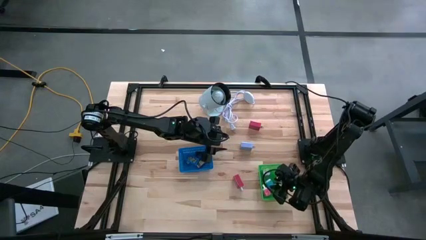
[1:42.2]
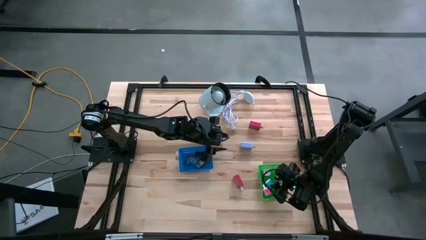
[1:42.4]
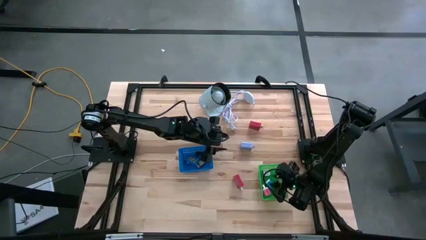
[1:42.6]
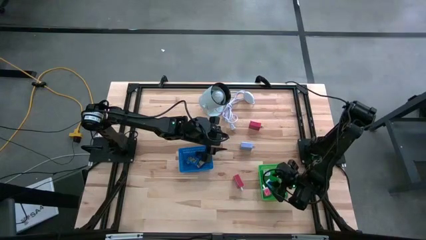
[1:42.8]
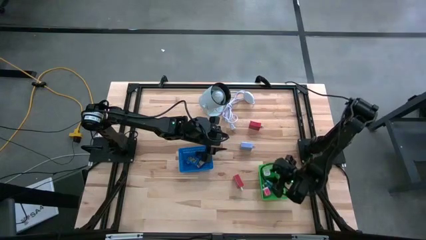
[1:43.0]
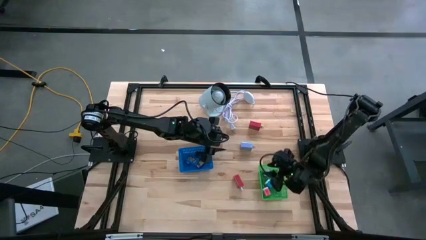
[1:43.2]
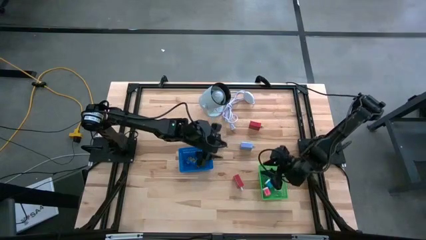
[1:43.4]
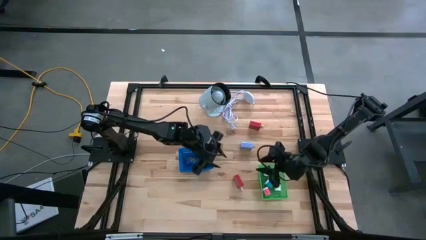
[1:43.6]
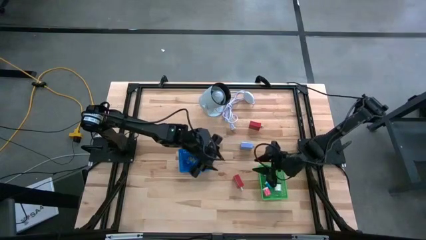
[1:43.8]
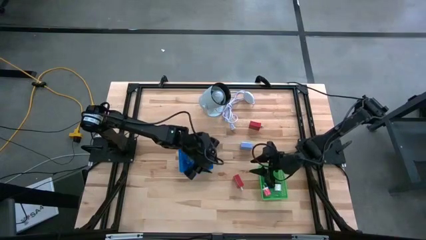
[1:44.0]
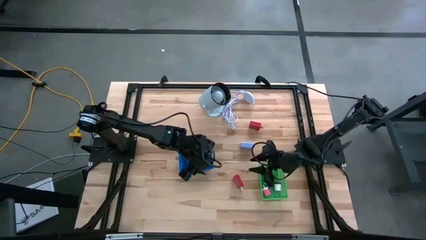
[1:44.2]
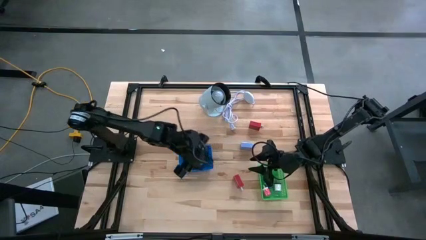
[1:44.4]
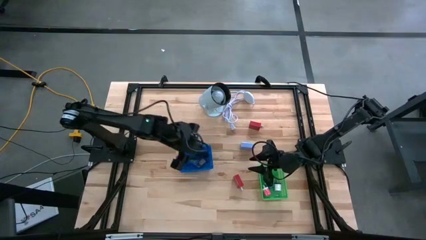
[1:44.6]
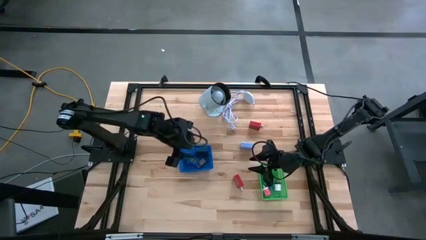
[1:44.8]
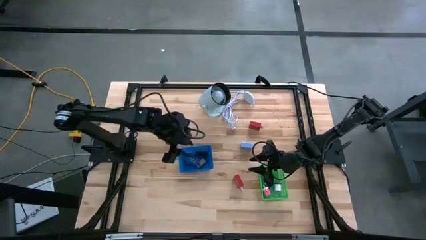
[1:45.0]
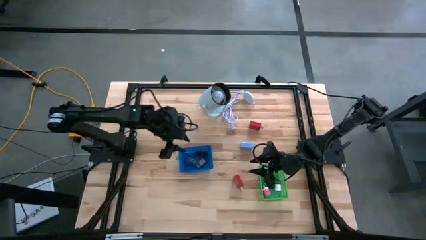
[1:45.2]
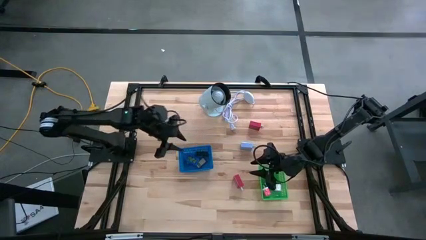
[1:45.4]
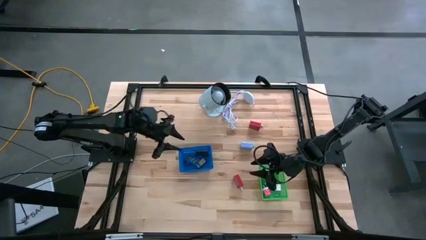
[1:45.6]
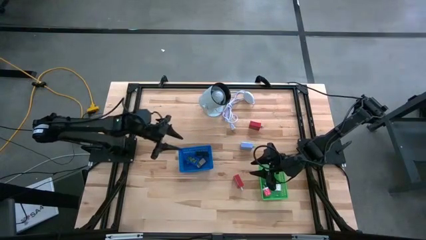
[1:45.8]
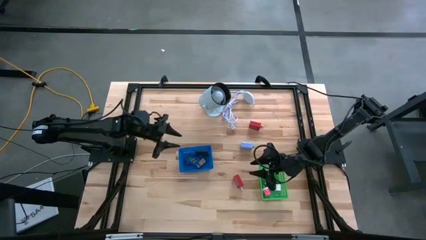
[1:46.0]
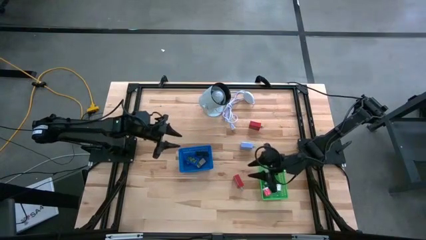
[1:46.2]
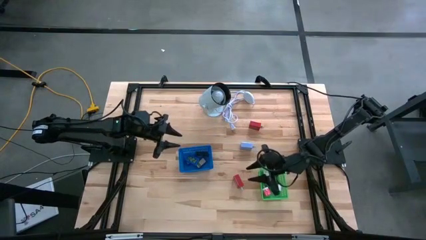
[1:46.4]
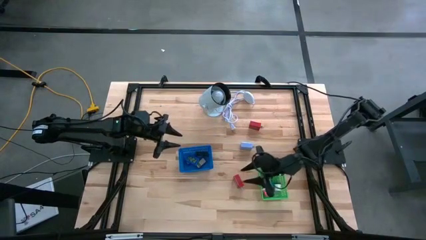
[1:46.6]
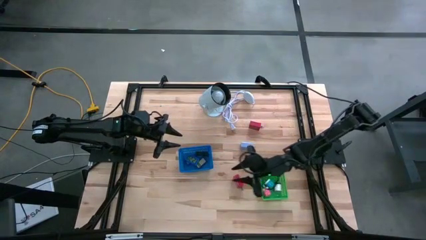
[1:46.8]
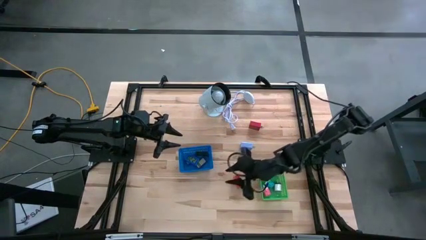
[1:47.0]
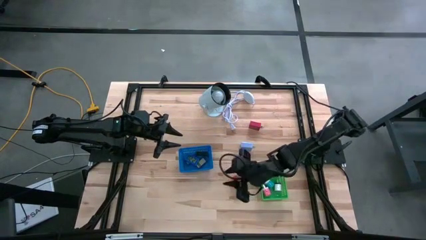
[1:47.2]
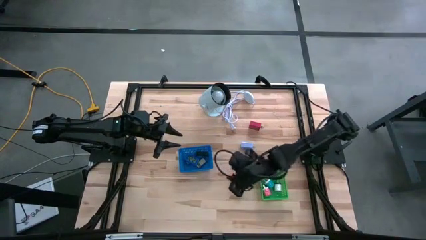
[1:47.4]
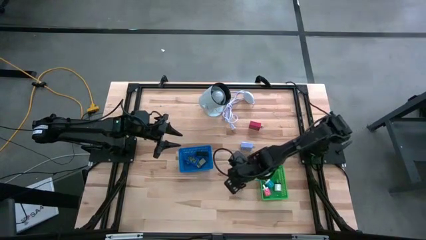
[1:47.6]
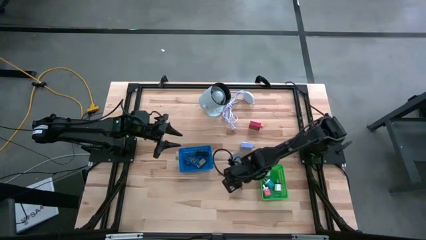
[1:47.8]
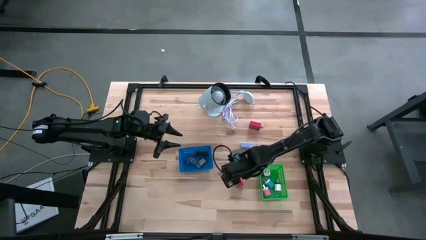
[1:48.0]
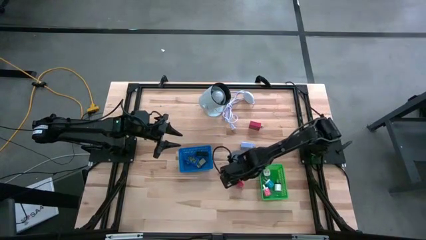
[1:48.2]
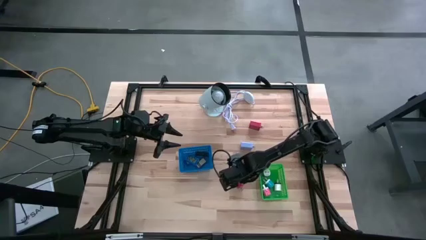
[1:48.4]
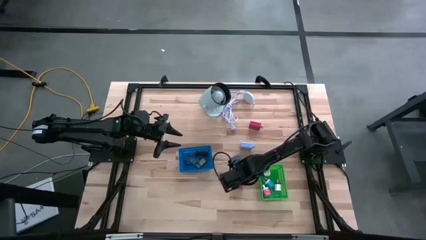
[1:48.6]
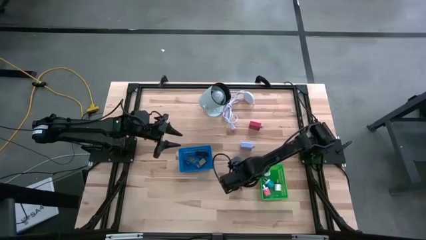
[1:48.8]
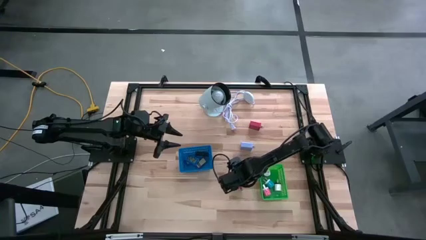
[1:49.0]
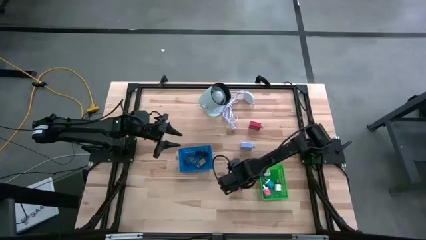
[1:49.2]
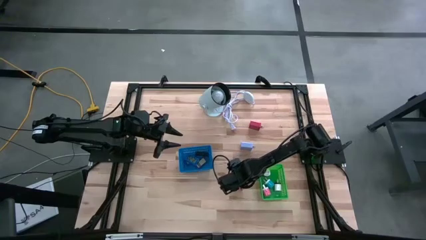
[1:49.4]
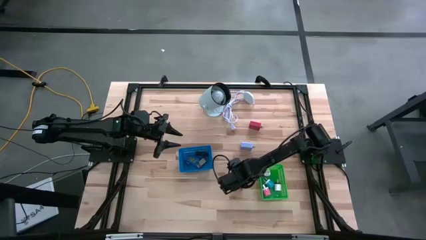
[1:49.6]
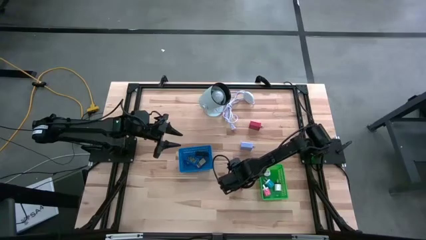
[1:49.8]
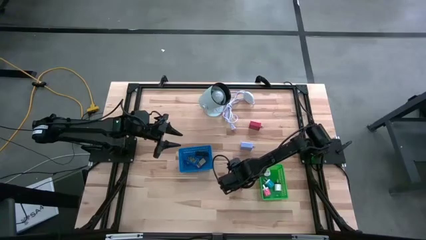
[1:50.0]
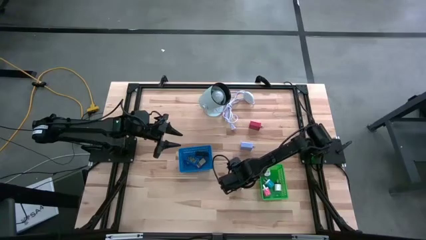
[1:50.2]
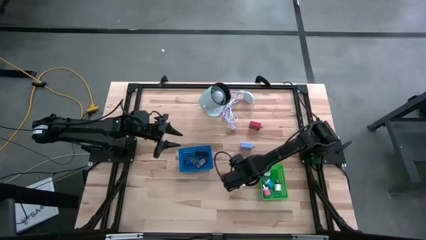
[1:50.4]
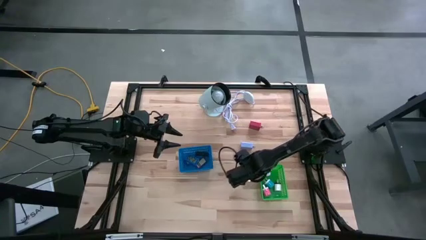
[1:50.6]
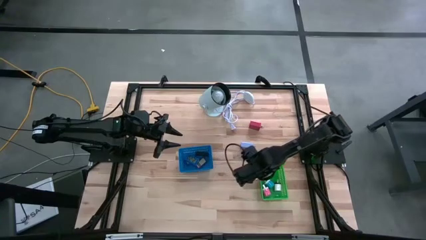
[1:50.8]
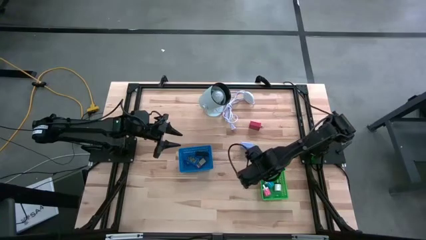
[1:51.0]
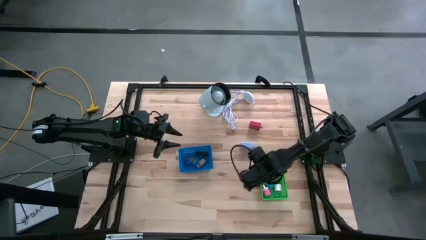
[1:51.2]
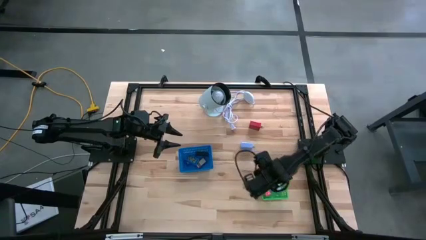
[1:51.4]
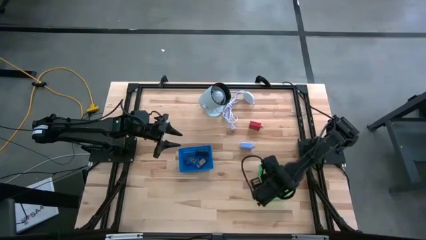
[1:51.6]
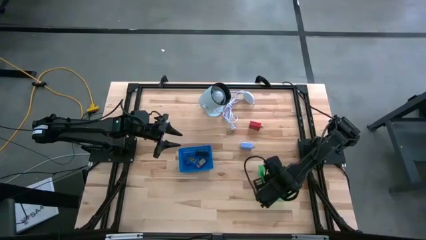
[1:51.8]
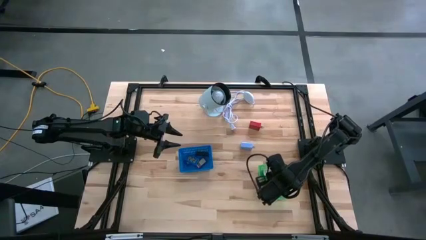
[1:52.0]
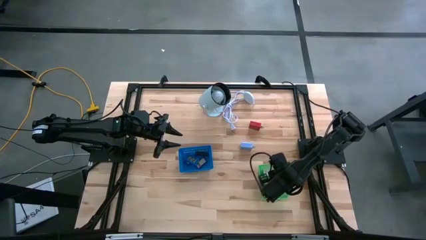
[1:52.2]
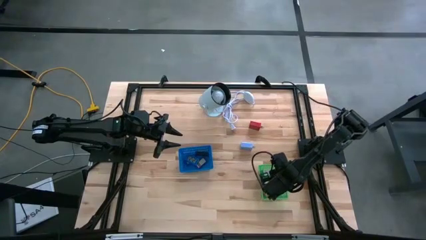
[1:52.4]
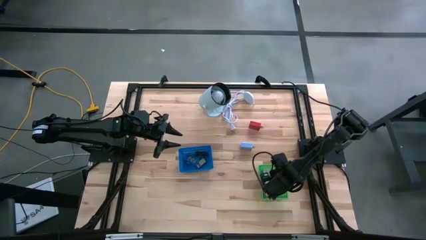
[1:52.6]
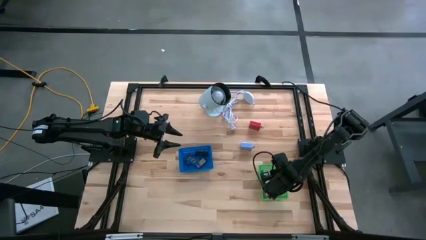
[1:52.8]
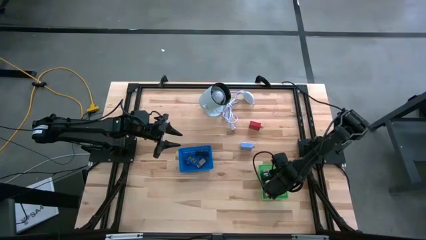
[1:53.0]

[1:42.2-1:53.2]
Task: Pick & Place Office items
Put the bottom red charger adapter into the green bin

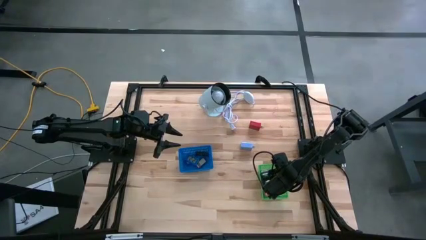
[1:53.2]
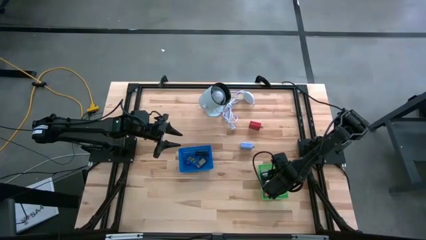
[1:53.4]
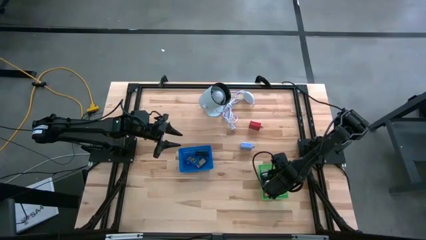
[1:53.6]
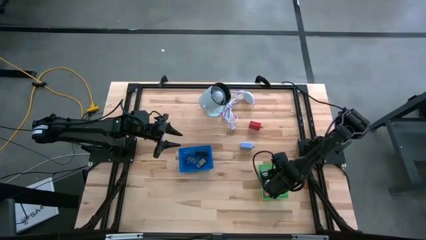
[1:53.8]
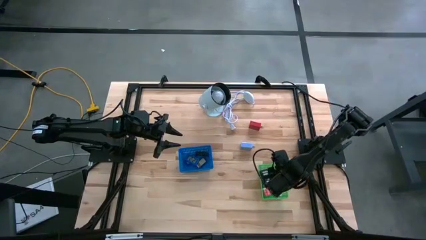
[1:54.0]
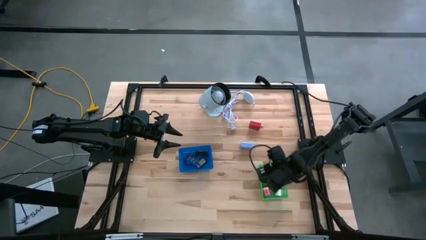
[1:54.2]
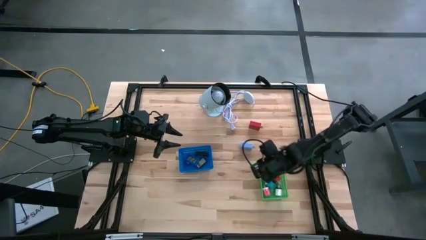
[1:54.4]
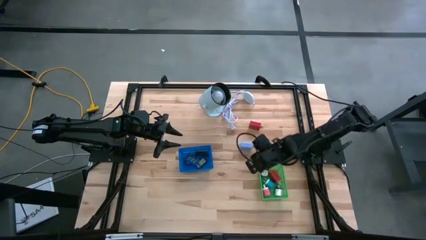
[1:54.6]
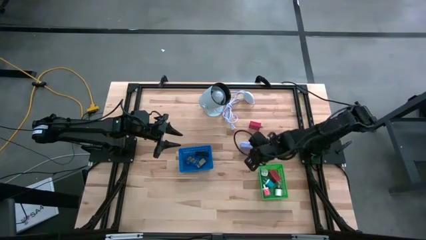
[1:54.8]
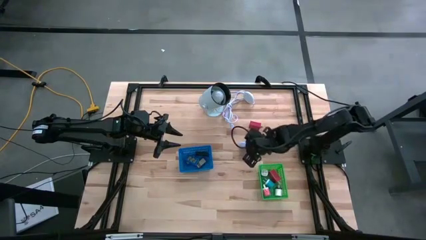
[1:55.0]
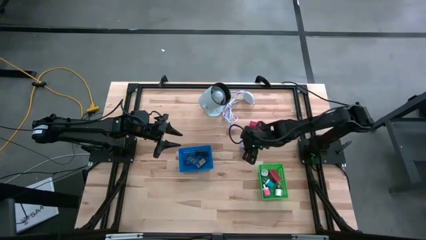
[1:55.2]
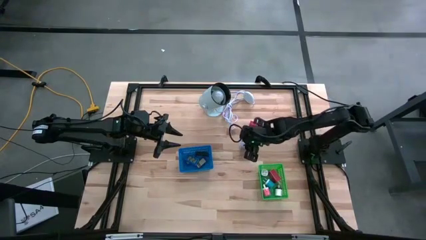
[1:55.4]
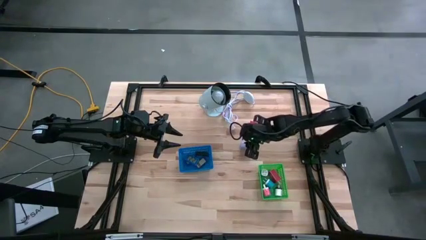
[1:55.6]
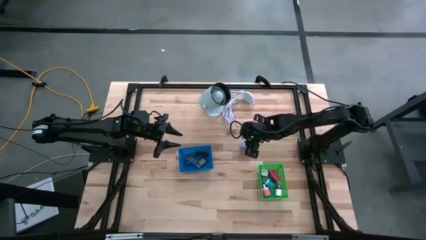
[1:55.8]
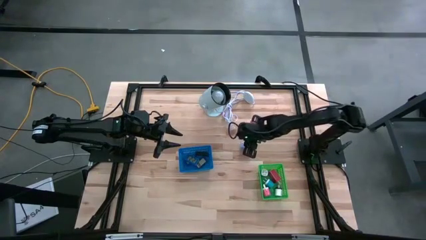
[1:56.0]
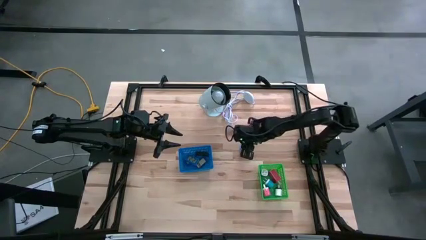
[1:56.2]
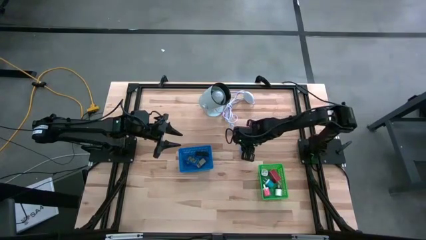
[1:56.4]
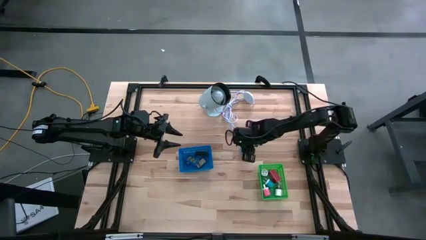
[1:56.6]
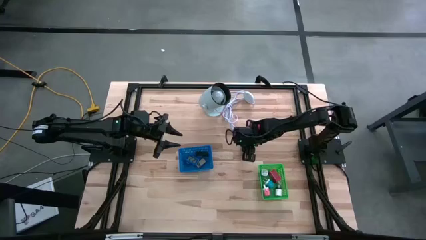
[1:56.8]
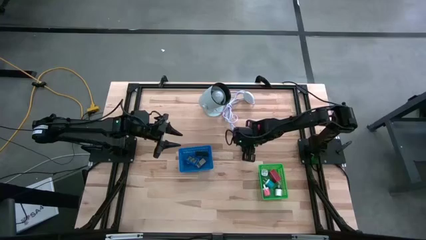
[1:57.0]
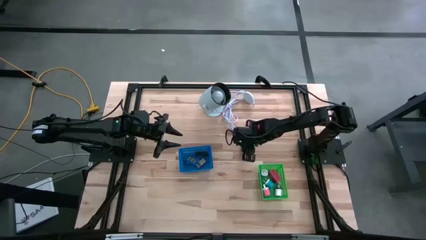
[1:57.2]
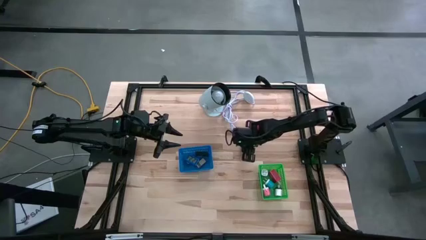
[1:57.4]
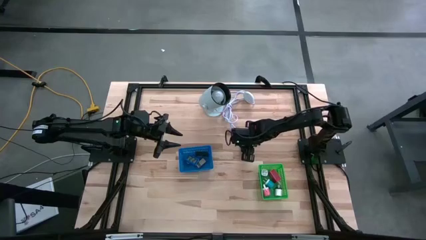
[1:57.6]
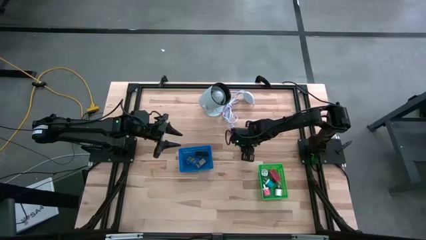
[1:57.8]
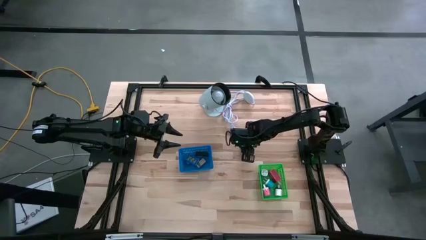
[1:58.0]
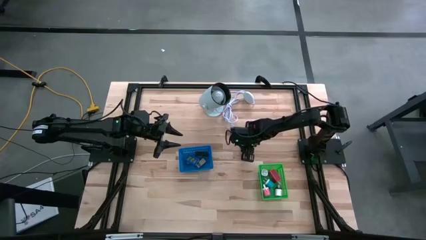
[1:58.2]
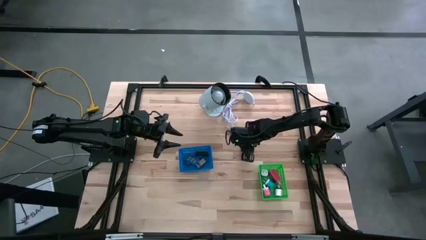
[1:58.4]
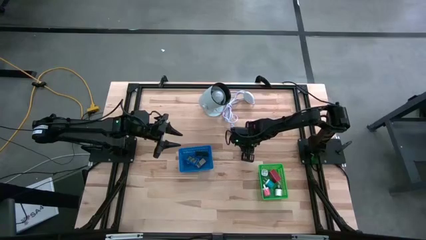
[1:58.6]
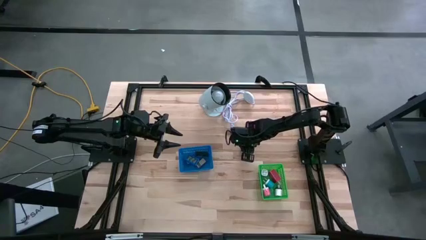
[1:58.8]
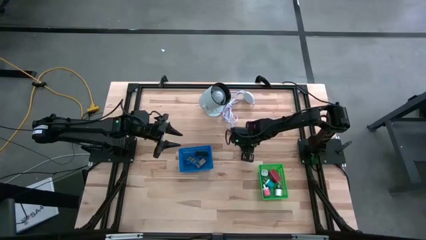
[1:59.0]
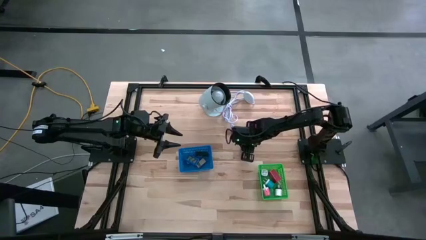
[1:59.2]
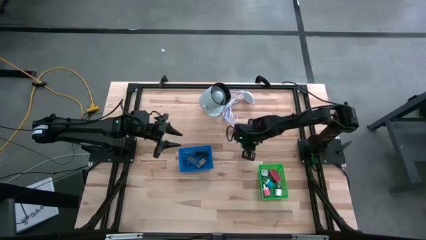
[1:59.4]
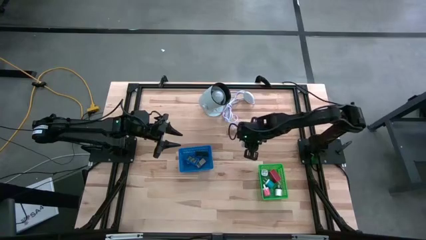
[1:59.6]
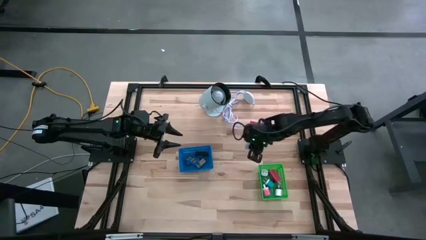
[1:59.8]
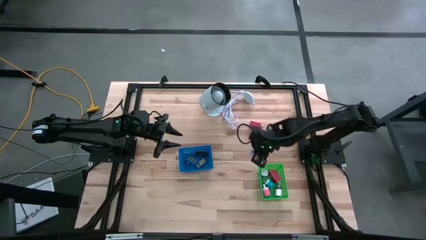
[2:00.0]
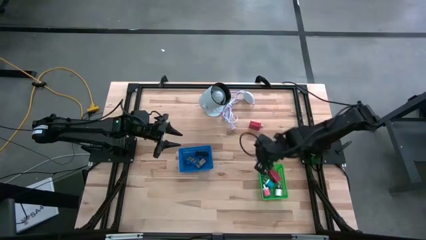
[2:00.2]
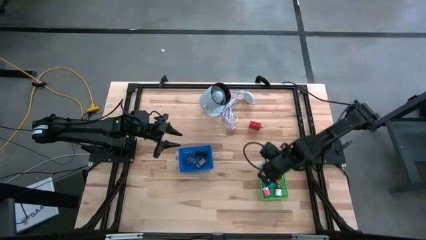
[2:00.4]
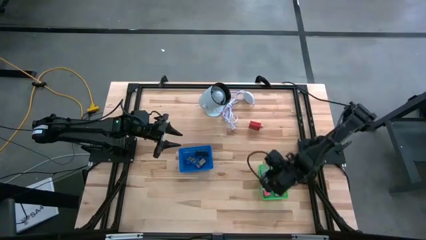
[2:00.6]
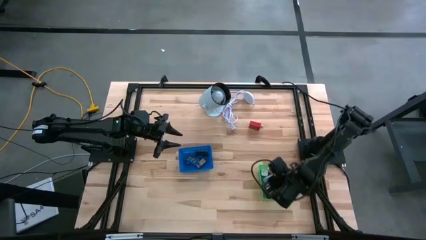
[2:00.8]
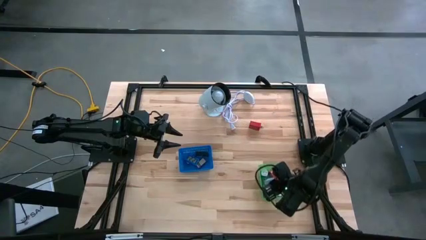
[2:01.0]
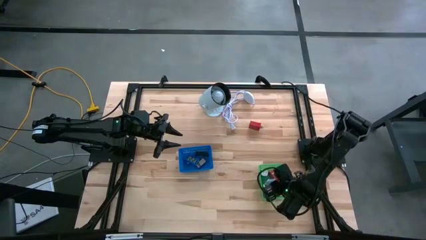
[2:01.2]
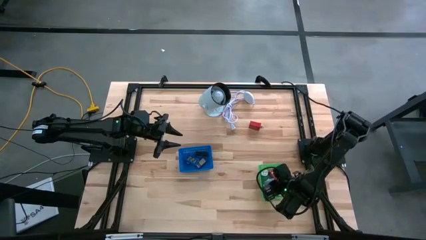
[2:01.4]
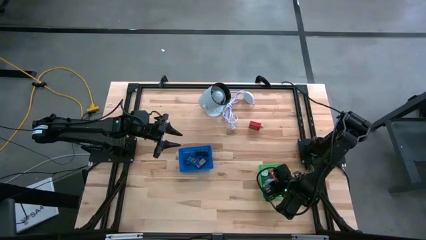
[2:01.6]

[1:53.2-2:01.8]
Put the light blue charger adapter into the green bin
